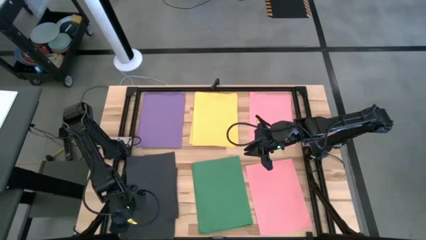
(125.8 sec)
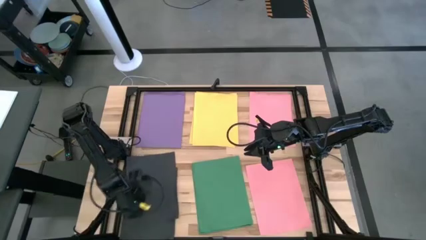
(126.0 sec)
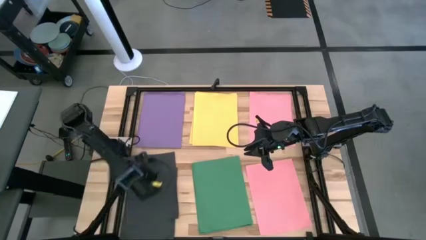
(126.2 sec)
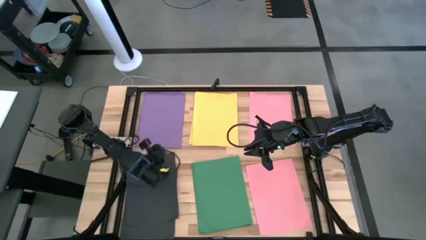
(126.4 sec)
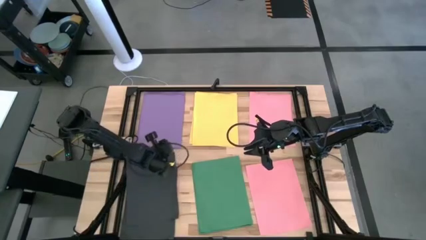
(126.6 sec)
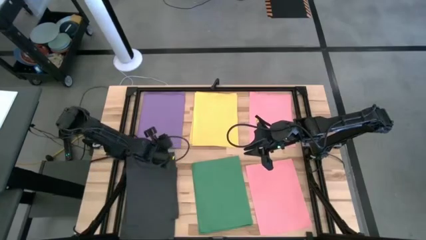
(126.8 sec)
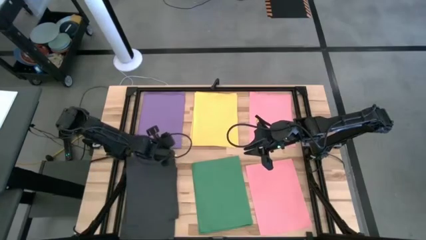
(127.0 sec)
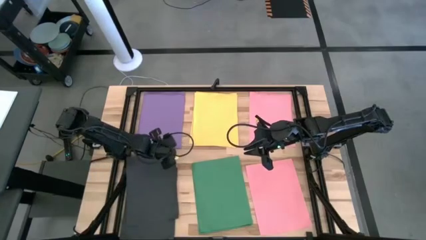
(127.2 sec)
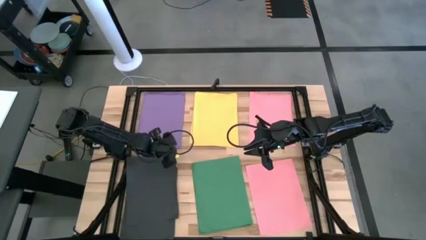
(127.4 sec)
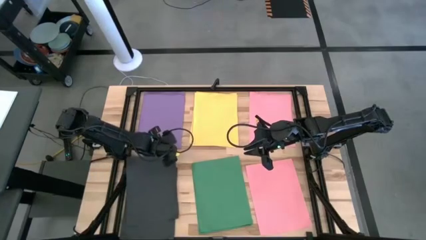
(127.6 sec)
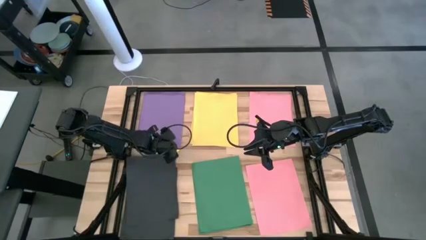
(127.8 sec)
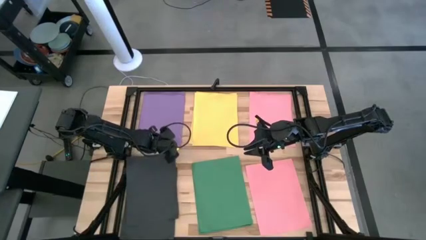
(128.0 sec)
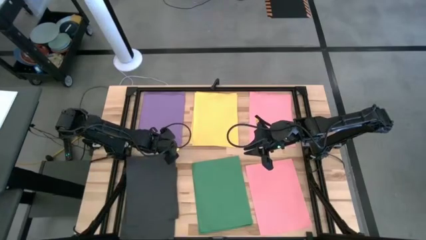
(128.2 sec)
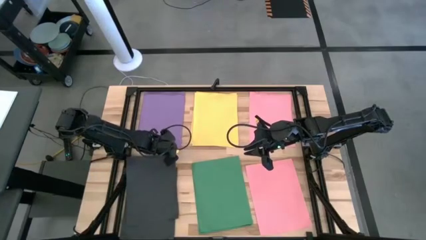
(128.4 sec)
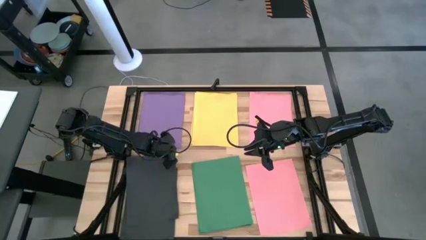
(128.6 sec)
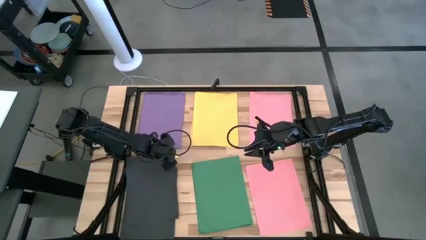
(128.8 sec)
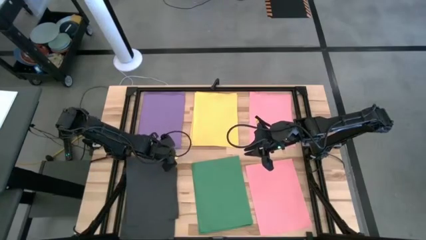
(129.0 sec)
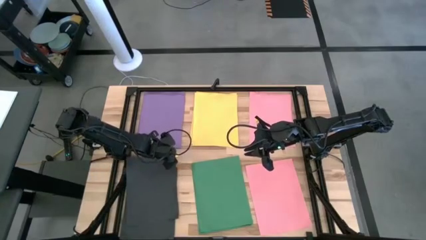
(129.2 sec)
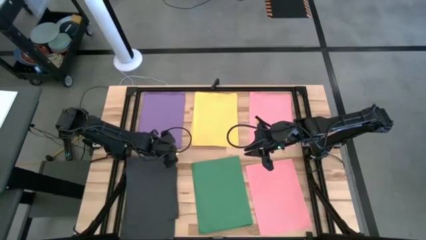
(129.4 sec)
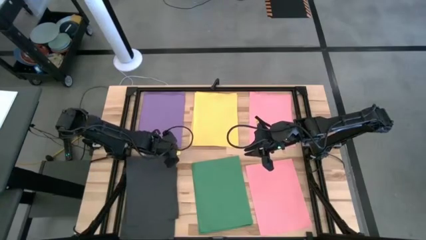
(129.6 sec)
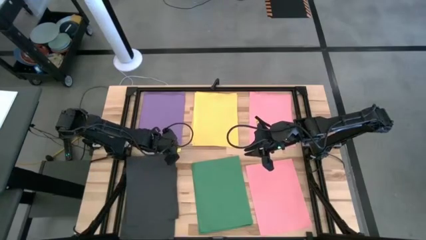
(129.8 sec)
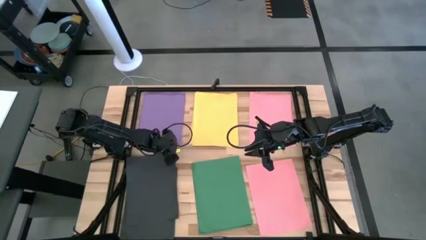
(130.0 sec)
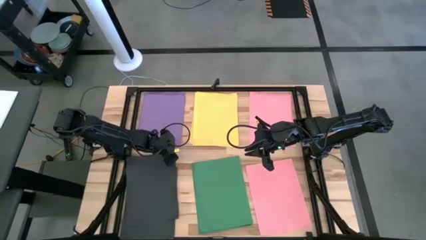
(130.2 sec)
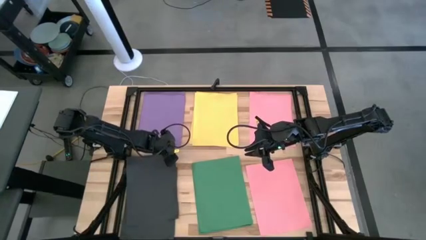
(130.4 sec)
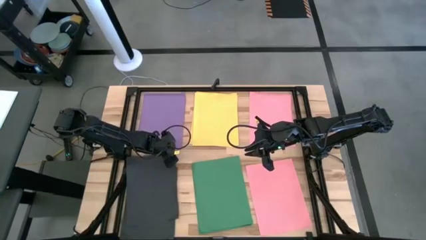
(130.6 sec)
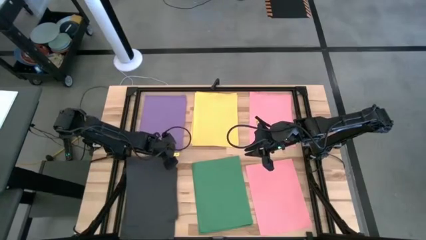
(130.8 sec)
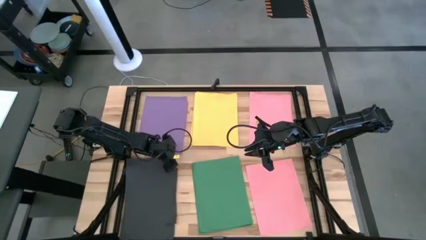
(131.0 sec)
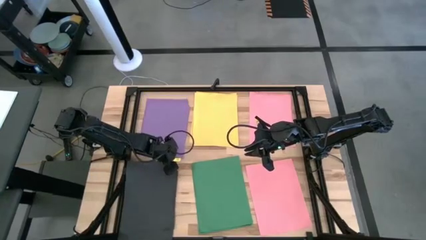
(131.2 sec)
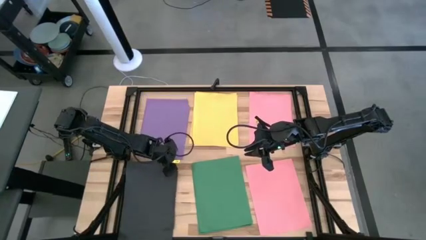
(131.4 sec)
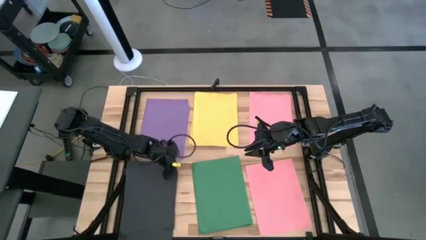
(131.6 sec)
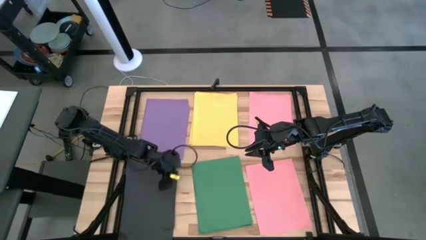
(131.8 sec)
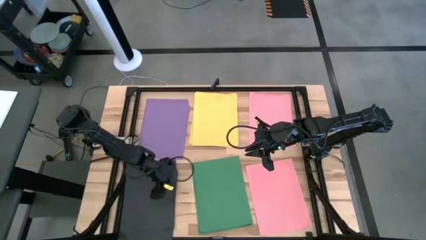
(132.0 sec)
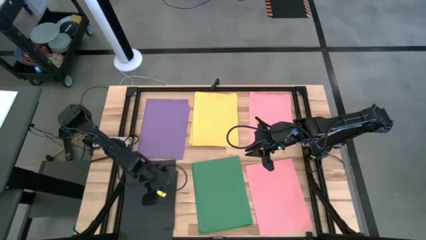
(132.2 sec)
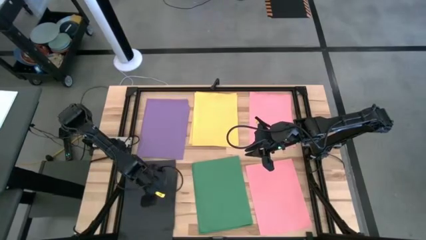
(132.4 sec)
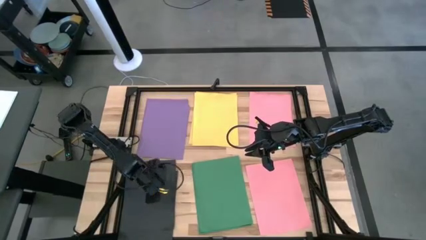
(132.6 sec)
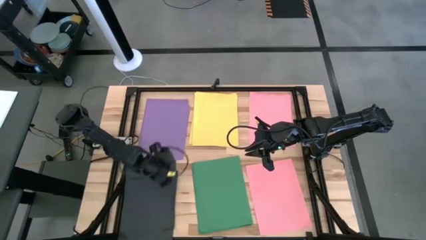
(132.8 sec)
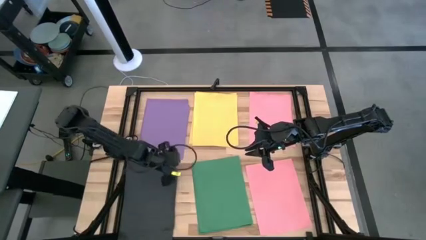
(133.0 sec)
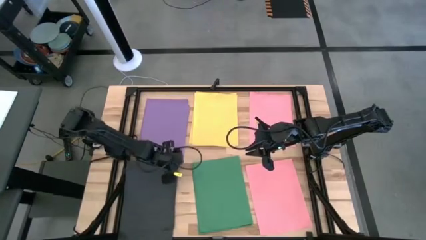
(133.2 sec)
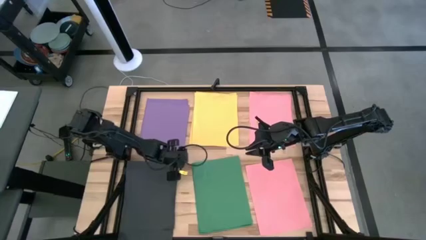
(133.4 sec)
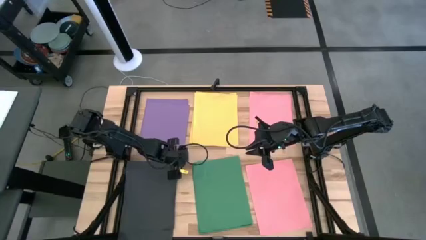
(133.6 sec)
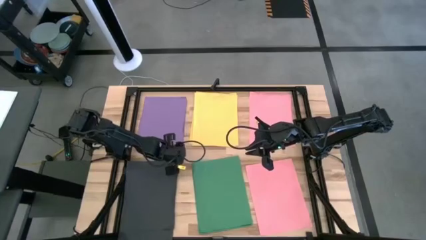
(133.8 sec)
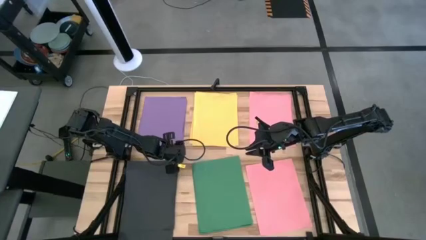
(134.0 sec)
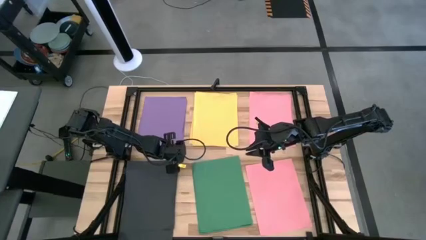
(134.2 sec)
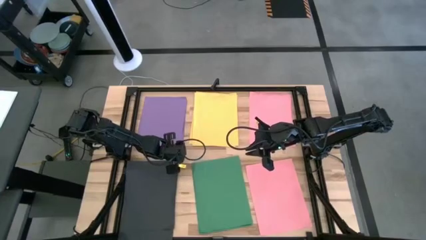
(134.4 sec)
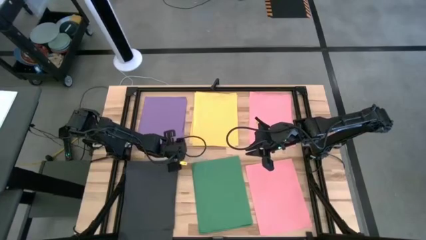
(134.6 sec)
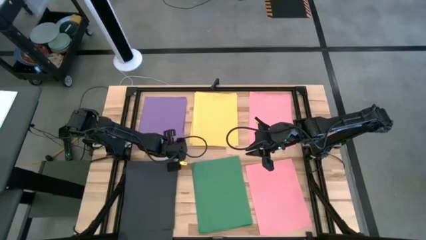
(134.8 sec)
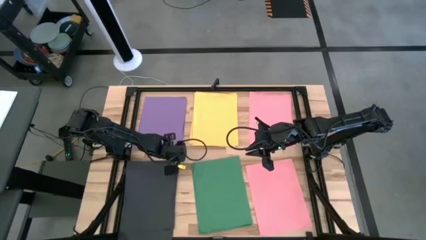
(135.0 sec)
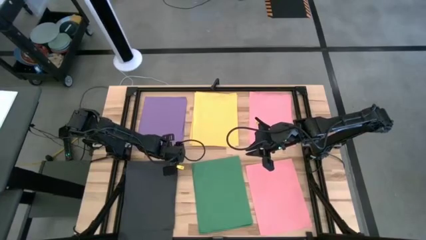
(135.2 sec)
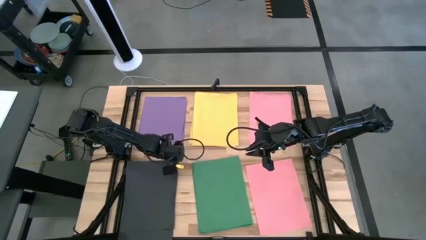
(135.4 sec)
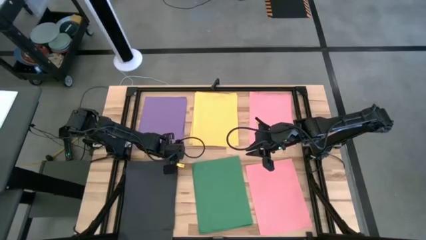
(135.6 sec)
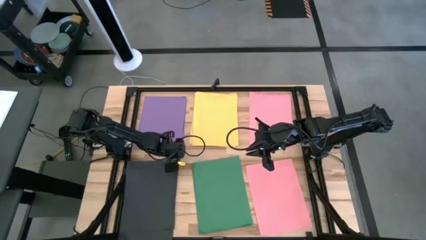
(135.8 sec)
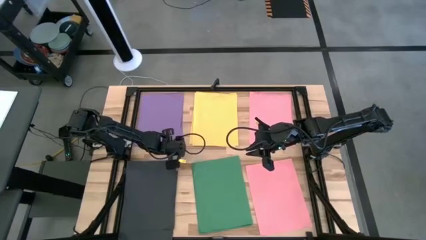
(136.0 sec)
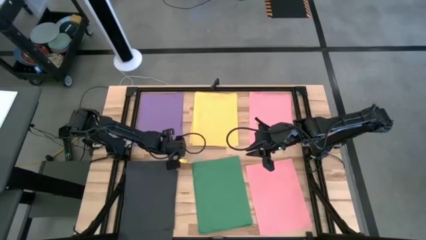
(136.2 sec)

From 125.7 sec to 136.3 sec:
Task: Organize paper
Adjust the purple paper

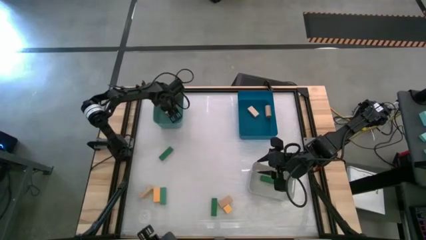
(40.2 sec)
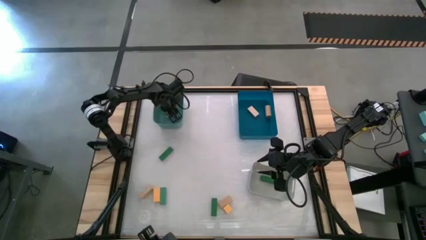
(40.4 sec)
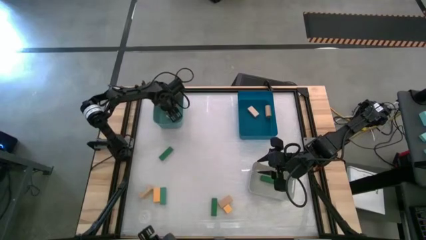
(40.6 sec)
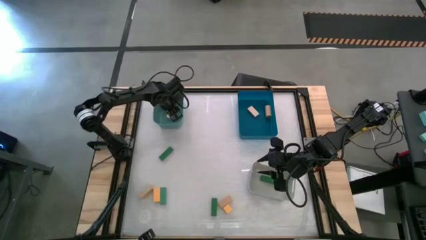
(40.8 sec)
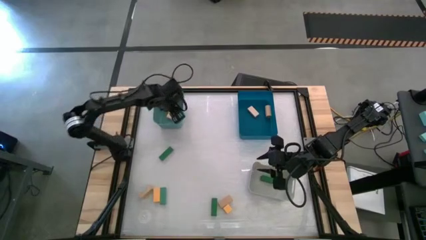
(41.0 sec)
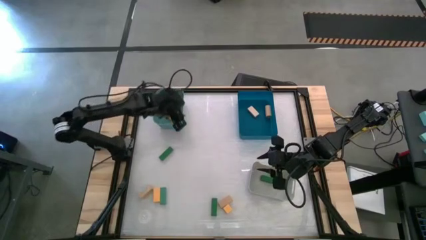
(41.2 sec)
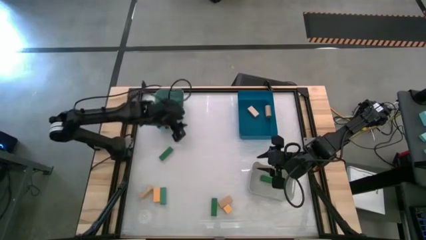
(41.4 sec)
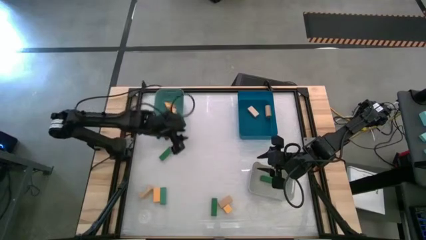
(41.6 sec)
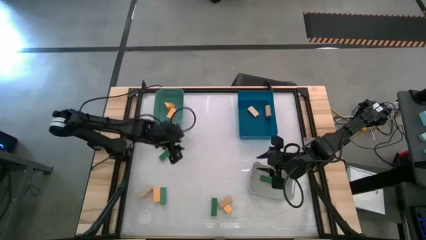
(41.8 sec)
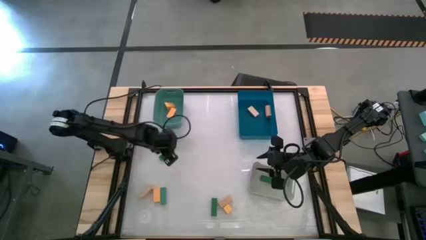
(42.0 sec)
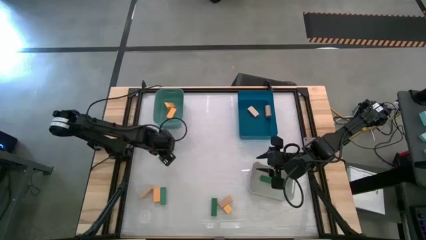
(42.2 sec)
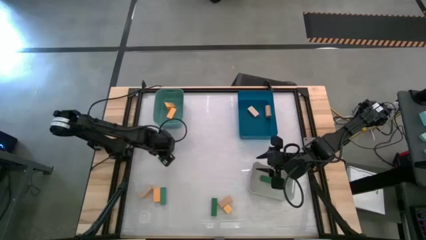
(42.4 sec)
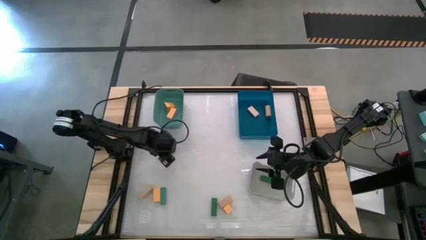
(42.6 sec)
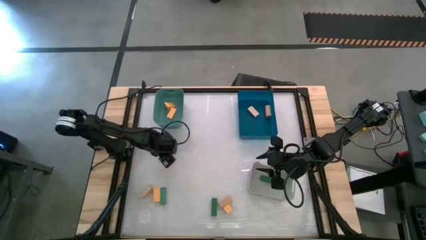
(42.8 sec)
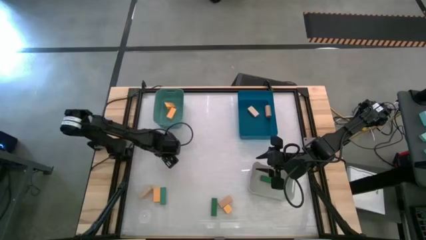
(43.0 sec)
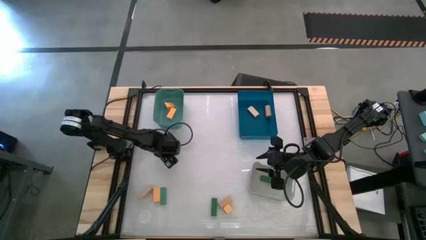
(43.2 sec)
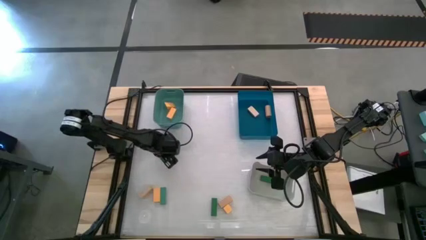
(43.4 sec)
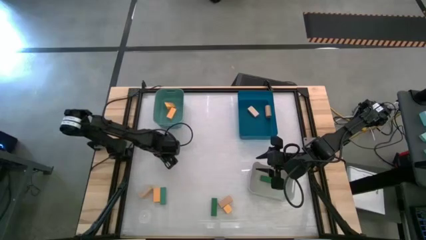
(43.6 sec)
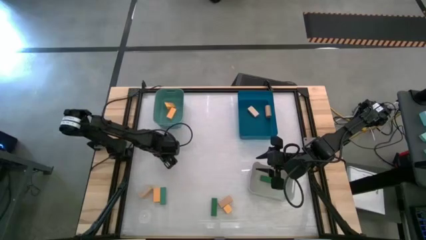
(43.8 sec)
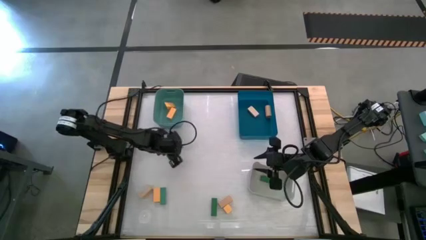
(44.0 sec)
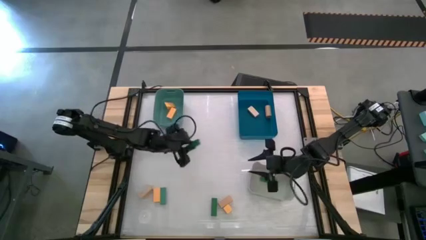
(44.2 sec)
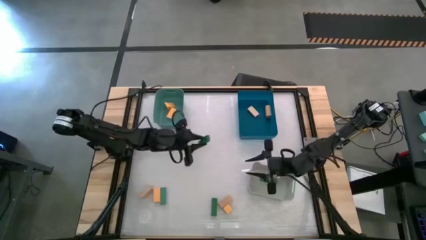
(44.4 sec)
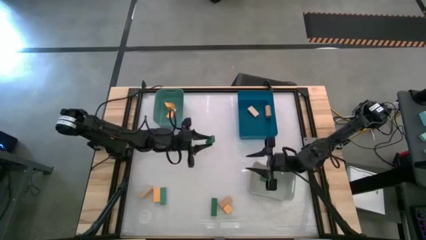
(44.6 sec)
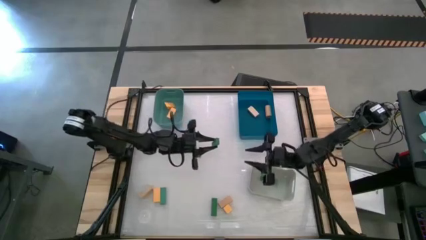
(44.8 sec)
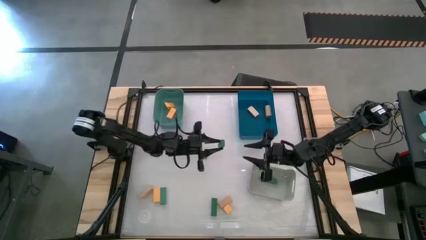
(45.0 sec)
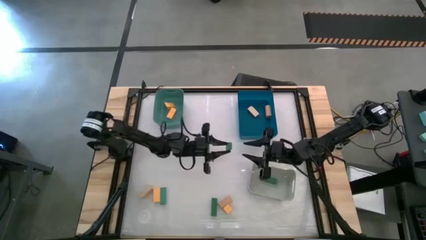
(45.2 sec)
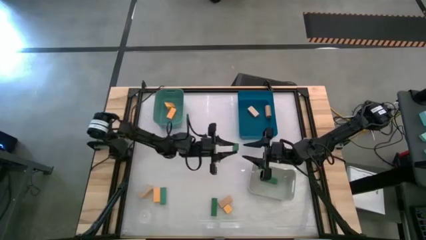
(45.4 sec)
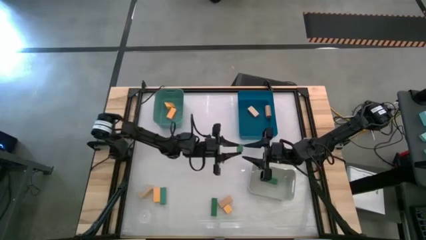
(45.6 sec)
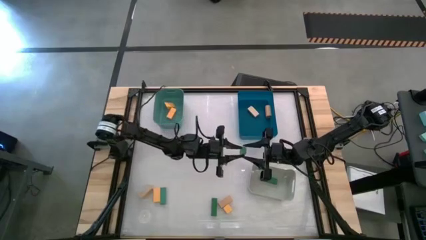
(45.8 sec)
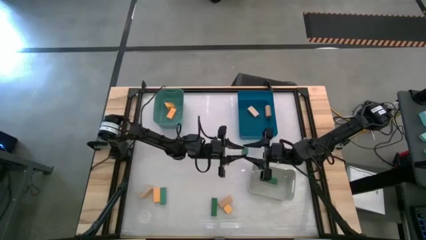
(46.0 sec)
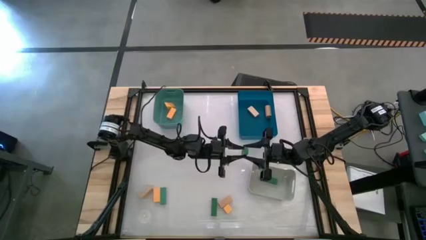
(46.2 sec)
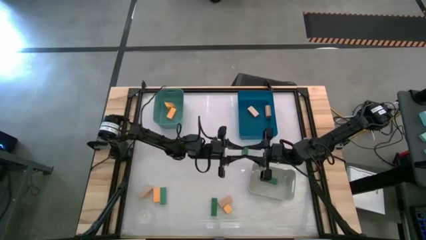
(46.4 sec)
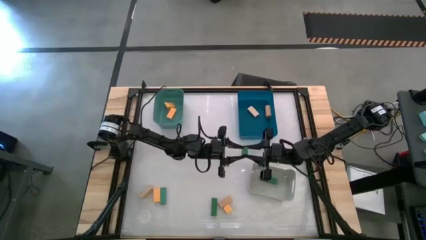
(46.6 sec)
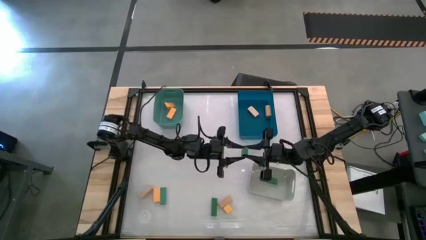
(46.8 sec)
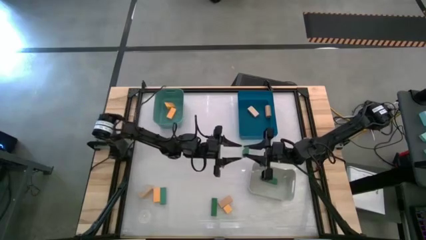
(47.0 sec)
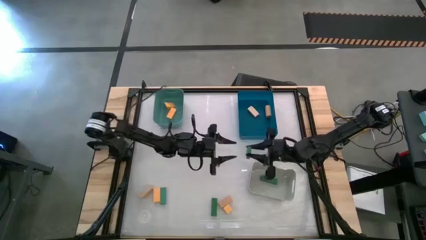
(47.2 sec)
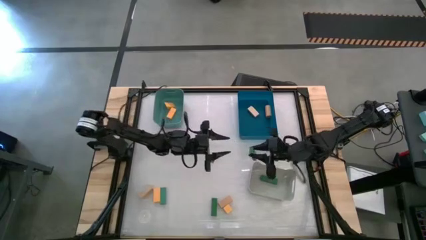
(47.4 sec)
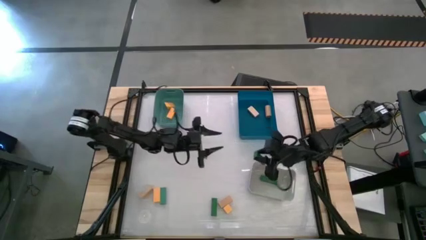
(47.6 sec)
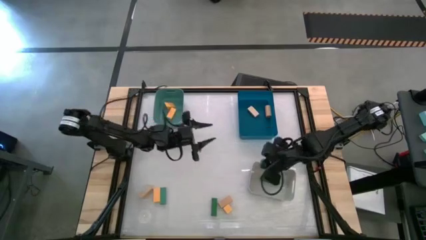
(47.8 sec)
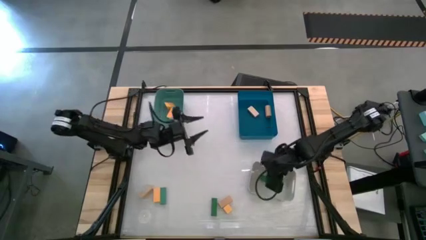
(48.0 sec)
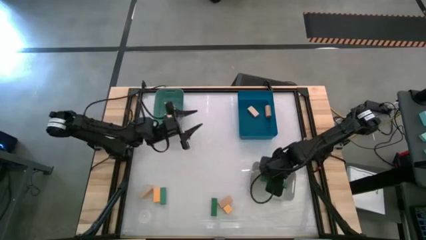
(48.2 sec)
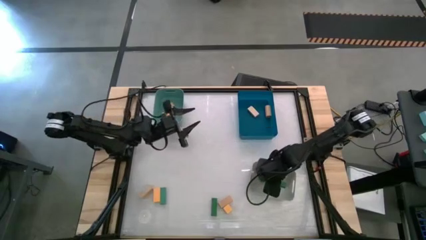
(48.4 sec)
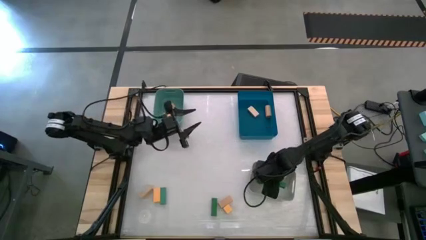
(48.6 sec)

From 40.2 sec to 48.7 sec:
Task: Sort & place blocks by color
Put the green wooden block into the gray bin
